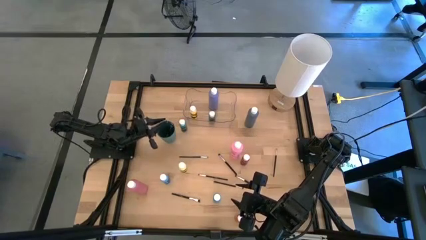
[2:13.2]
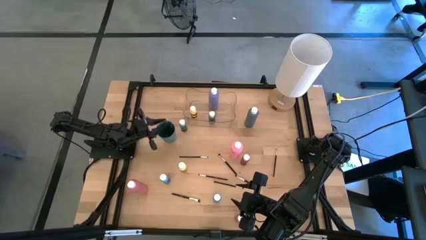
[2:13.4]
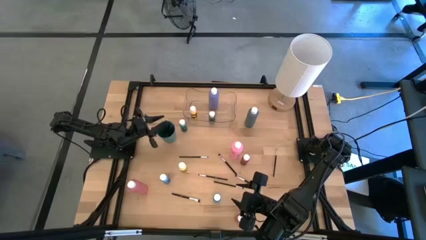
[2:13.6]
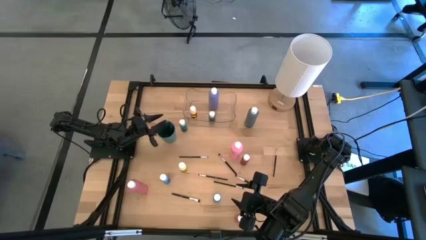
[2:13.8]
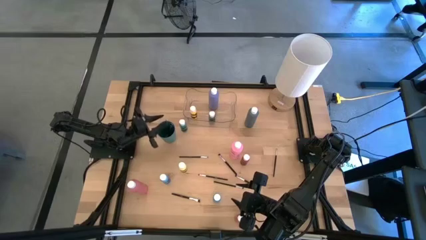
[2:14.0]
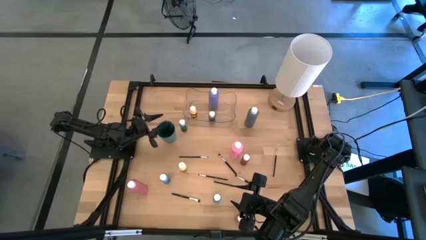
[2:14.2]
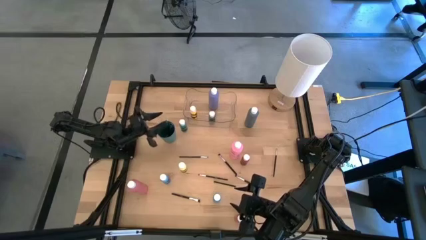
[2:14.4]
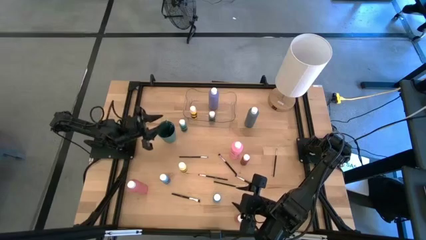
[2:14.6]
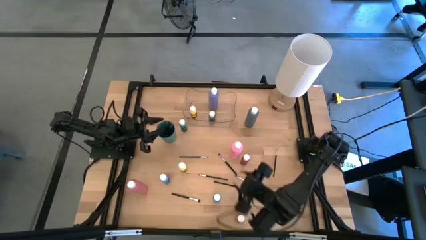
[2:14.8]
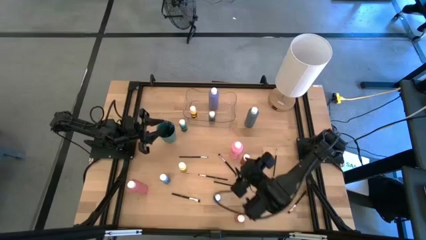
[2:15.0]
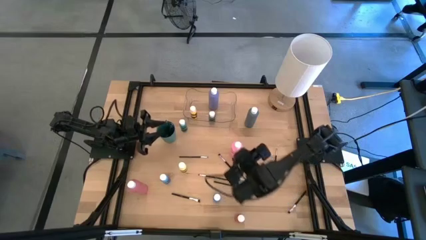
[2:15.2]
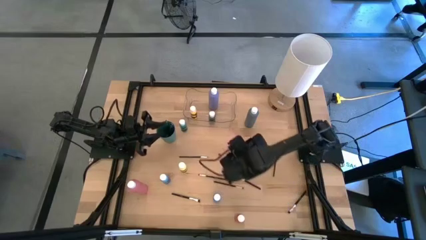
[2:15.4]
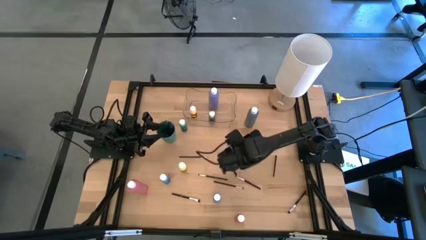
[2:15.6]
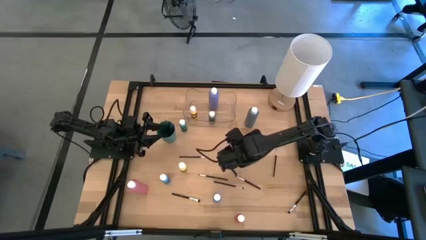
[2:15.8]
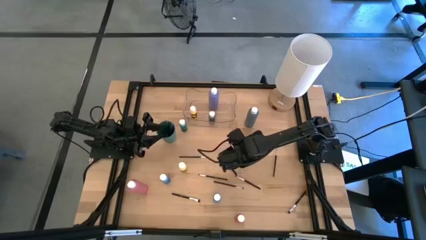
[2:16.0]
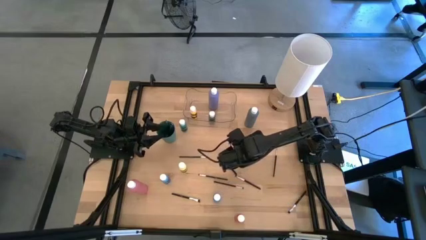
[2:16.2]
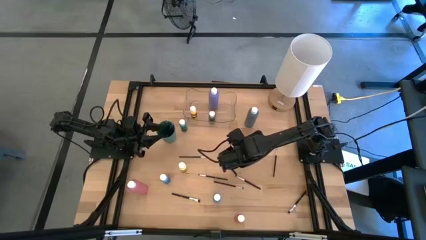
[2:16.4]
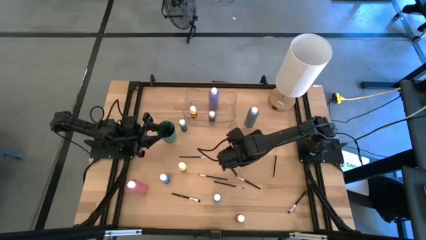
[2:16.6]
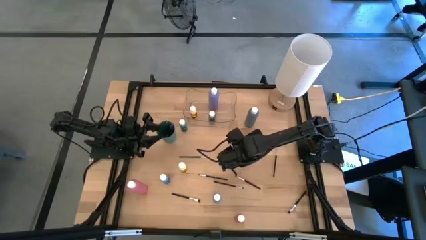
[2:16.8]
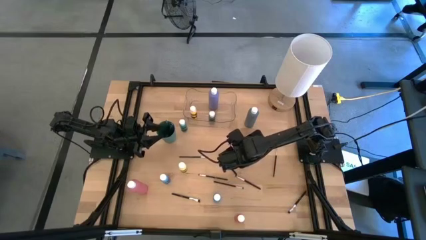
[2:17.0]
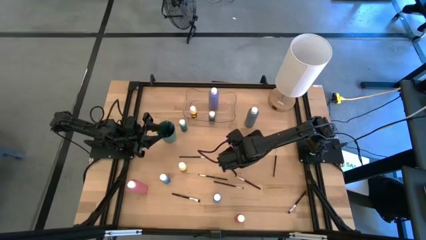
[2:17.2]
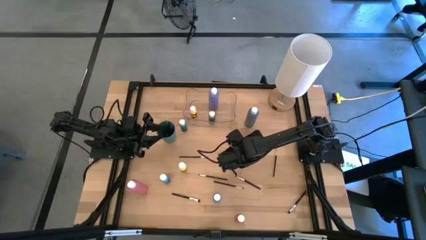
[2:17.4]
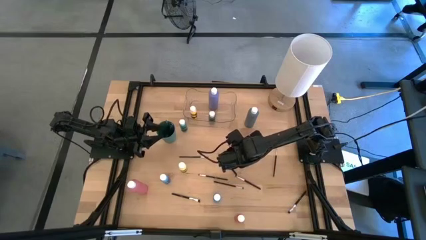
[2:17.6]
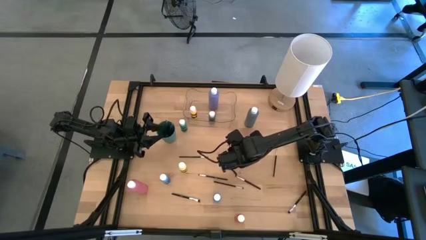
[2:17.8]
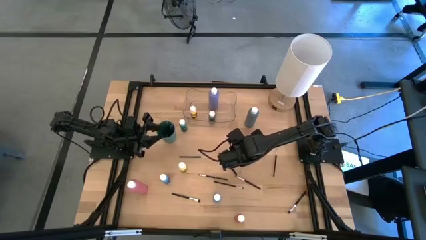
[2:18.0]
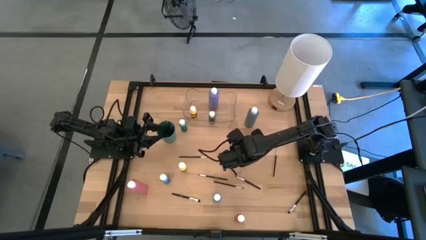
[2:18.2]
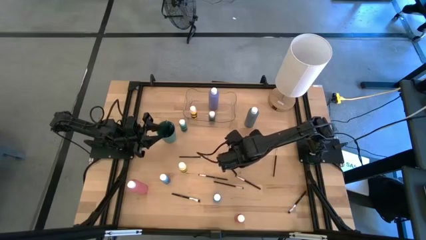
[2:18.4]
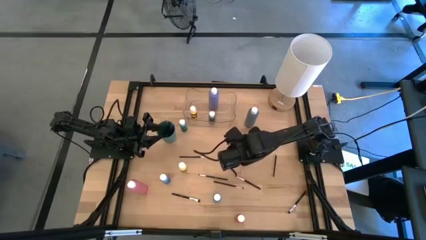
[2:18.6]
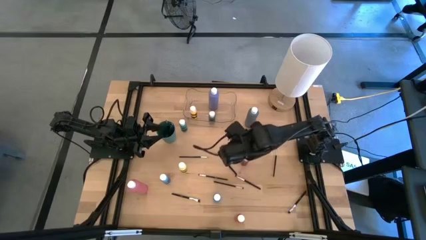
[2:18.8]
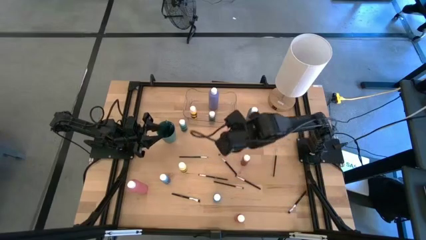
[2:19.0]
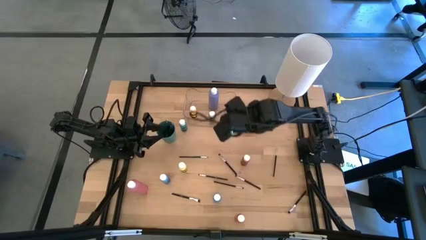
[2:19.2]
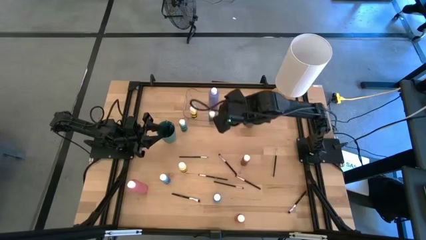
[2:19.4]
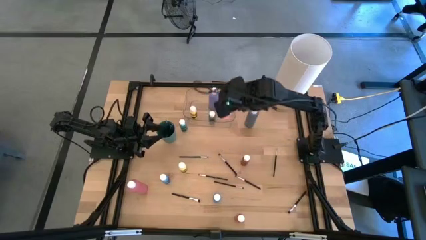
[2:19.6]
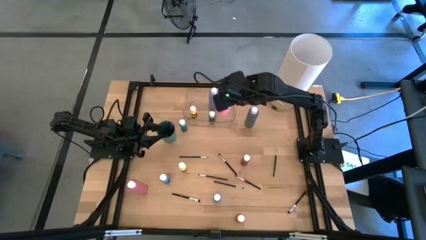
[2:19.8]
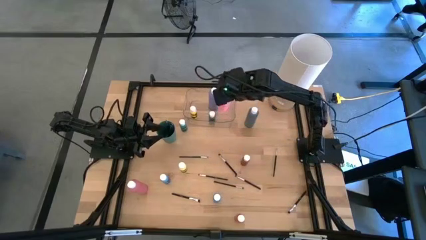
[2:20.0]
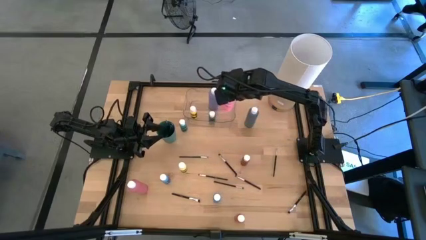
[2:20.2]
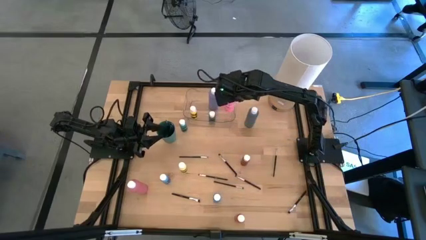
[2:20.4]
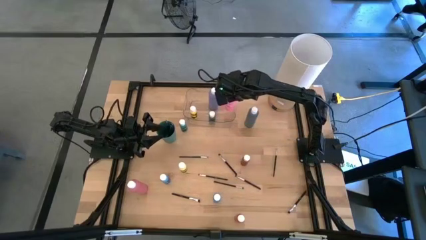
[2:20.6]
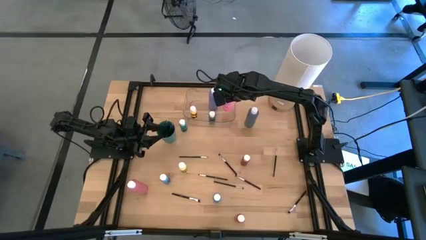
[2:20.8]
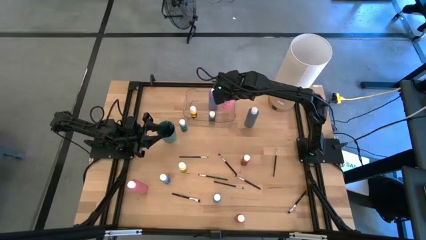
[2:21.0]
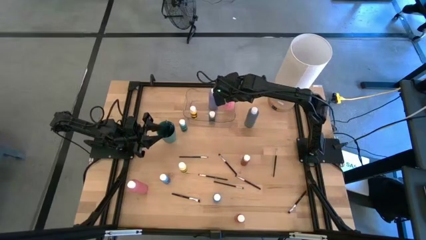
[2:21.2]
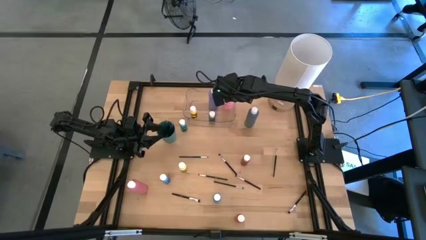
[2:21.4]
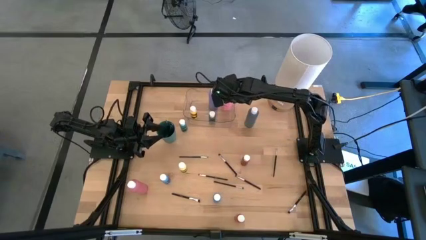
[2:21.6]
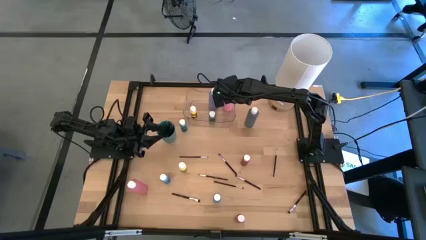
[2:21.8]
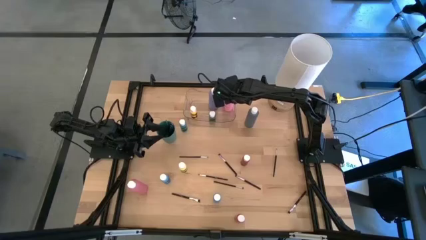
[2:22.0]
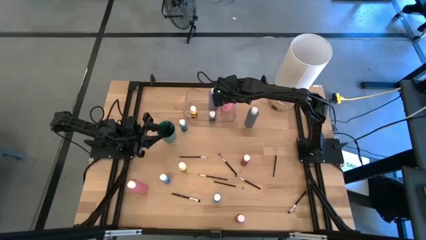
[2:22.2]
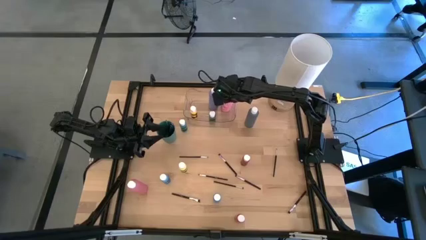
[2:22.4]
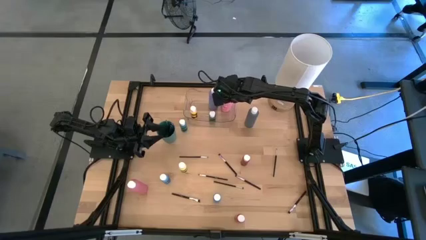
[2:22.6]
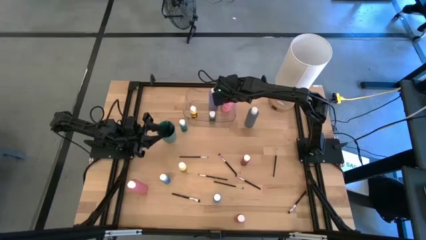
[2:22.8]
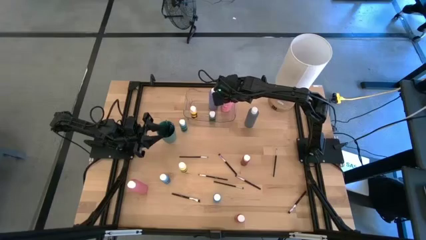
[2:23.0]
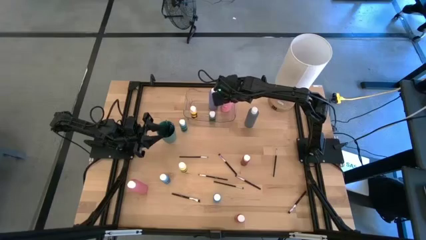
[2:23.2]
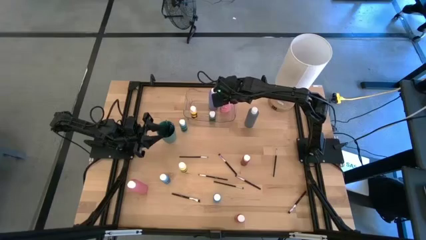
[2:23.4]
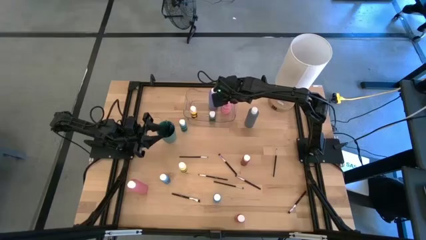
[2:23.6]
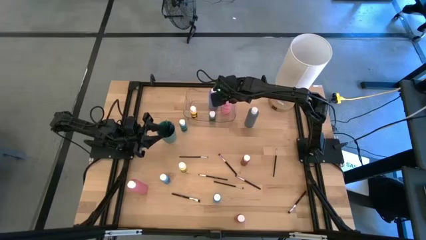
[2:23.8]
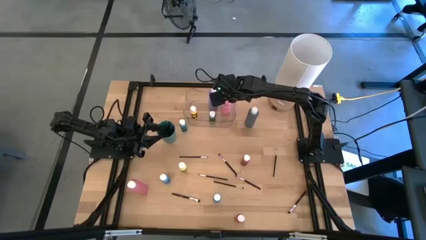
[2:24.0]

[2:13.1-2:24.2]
Task: Pick & Place Paint Supplies
Put the pink paint bottle into the transparent bin

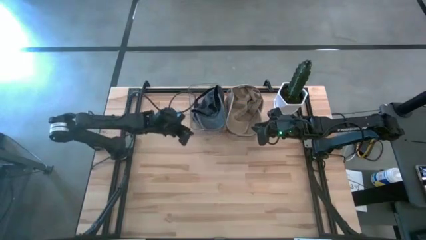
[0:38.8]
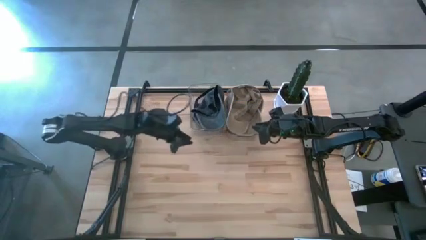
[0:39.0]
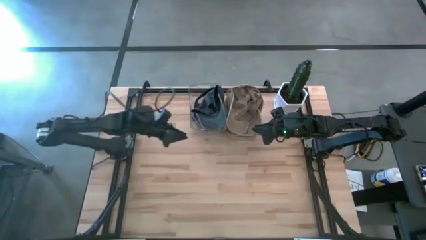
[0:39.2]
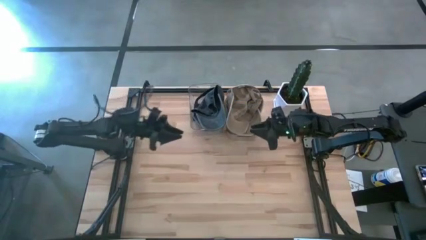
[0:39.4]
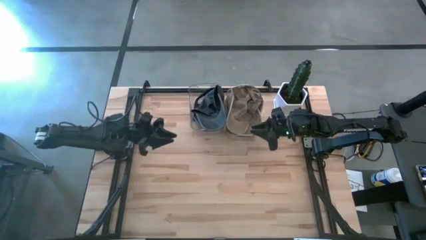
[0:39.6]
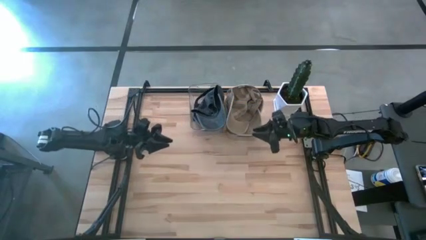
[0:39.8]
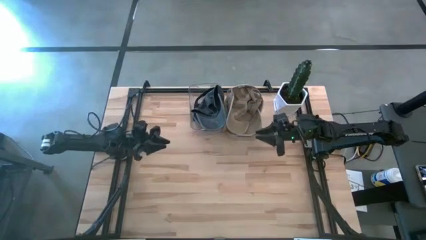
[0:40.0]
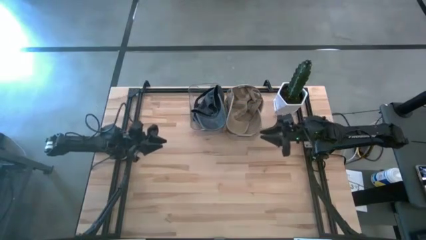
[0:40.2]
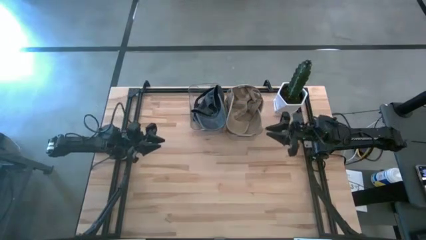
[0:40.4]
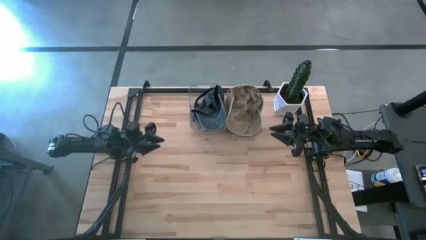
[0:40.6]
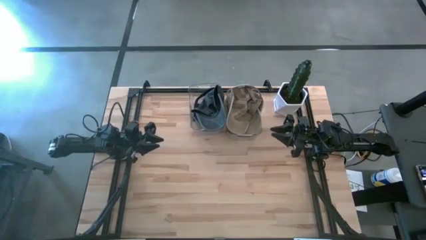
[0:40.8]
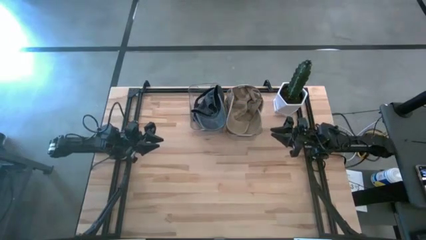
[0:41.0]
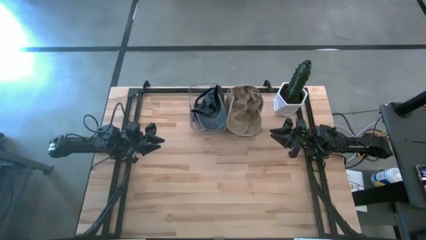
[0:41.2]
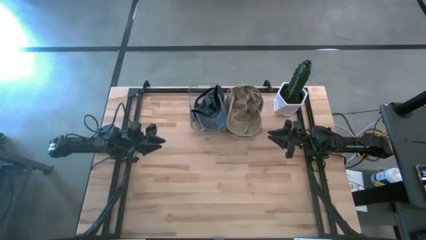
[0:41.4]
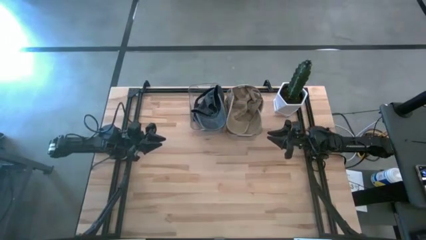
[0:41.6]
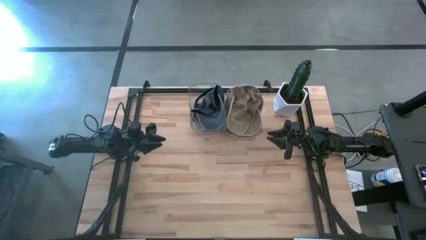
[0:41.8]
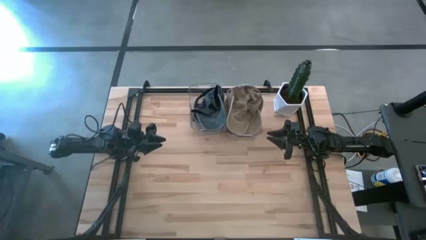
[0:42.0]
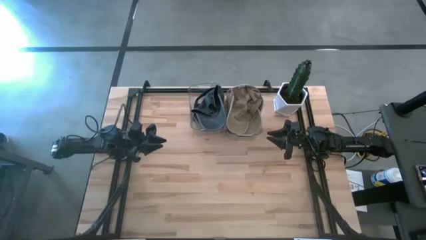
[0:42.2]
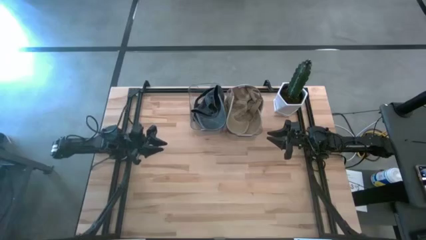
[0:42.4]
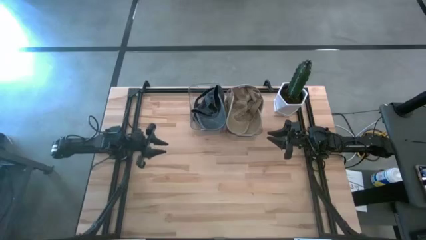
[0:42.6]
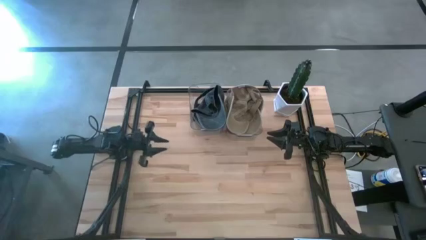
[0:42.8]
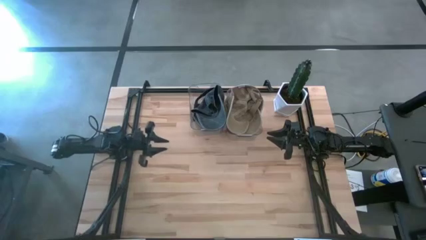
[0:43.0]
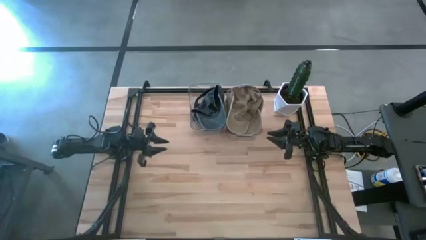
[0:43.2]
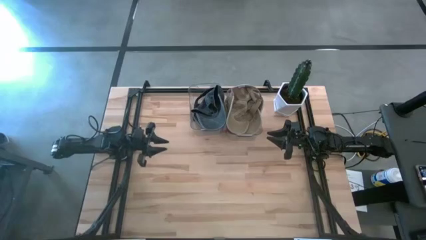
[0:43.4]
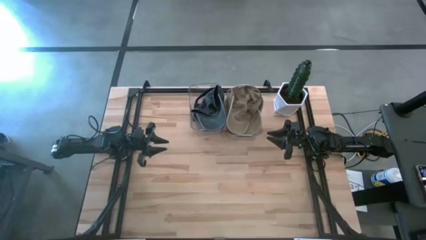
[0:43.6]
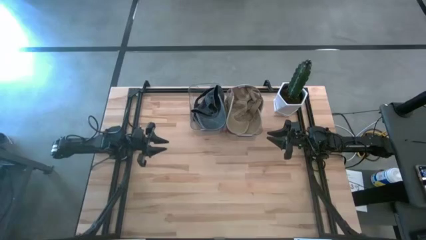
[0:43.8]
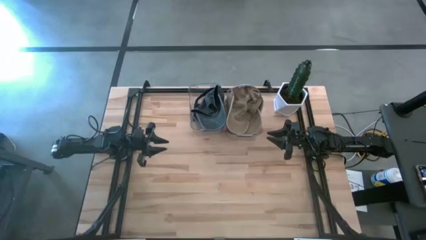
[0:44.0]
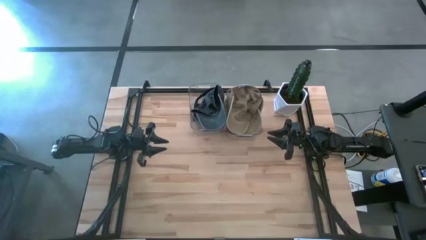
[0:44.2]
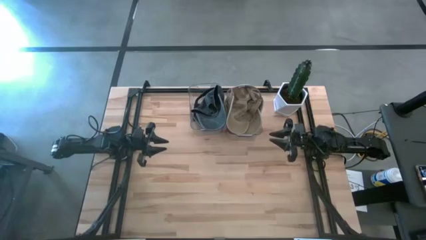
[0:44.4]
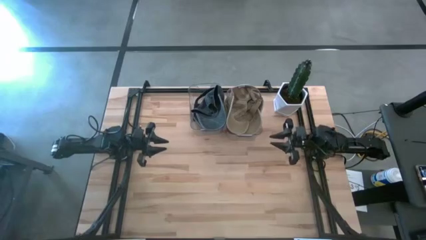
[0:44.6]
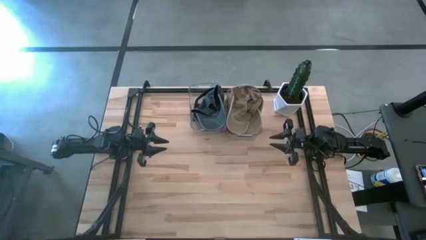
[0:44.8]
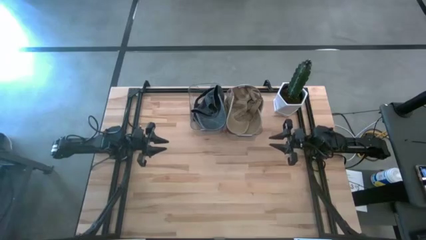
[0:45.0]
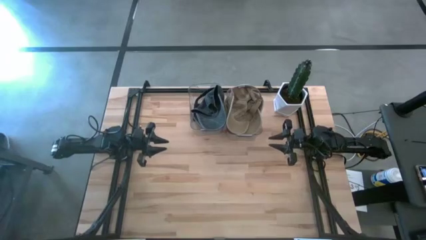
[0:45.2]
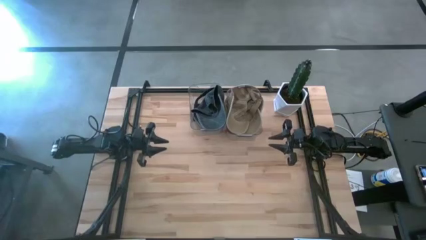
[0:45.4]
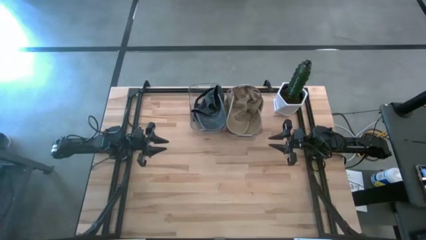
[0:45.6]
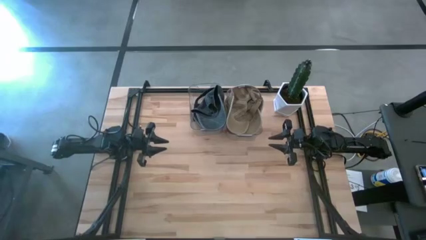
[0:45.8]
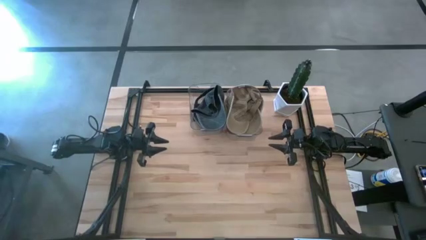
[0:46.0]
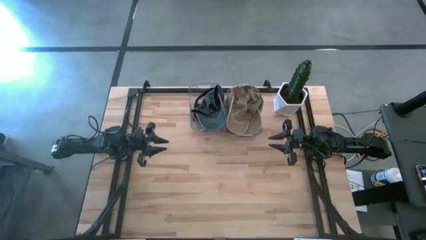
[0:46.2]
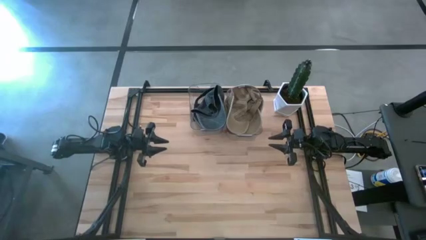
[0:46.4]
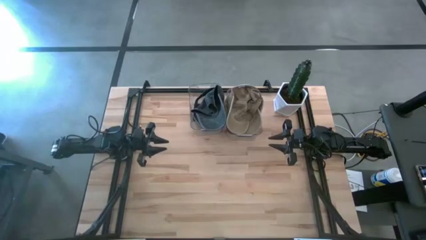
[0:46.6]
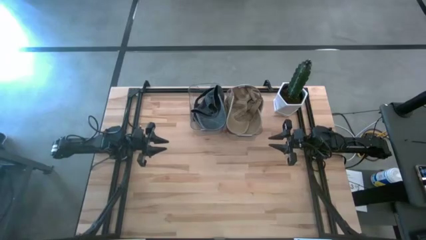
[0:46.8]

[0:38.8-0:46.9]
Task: Pick & Place hat
Return to Home Position
